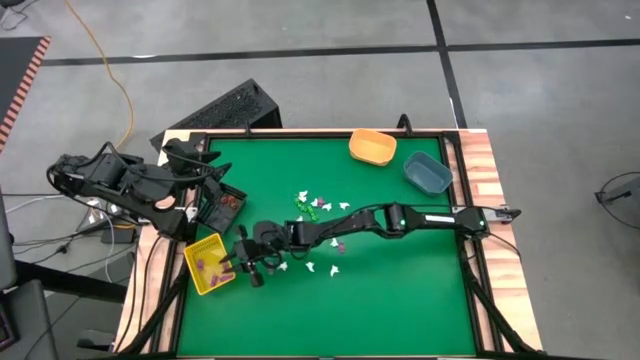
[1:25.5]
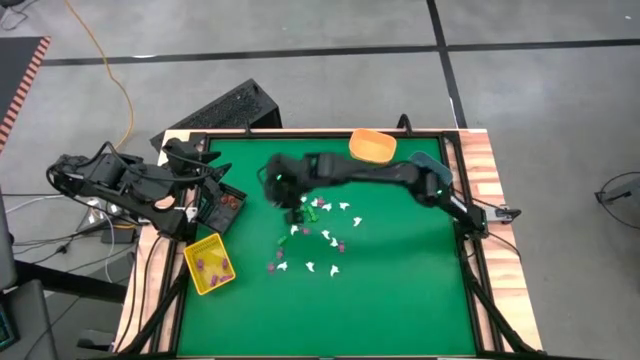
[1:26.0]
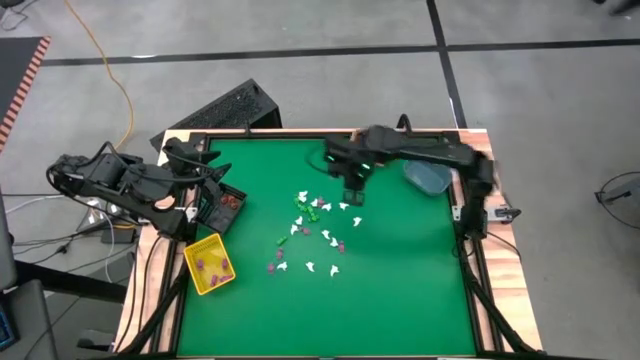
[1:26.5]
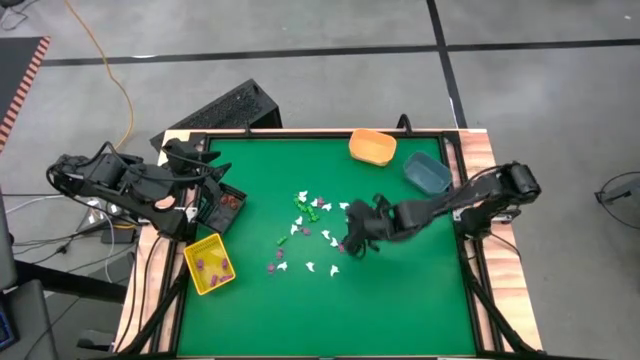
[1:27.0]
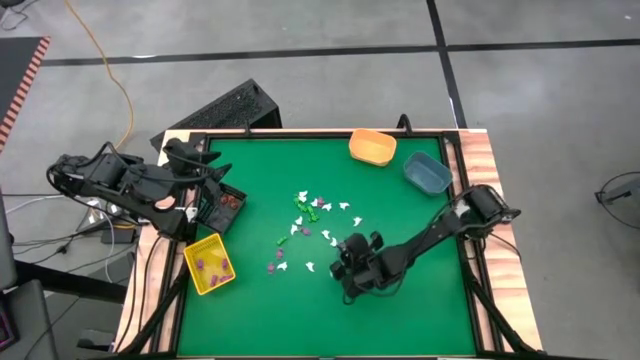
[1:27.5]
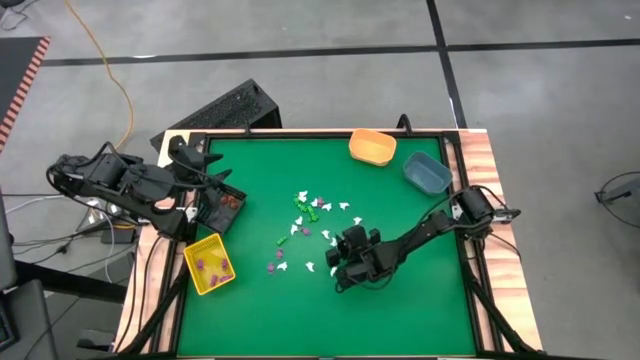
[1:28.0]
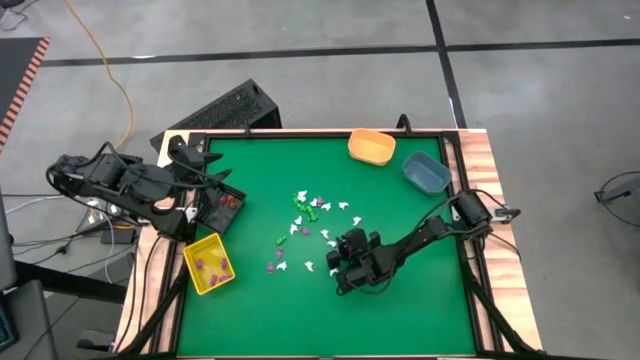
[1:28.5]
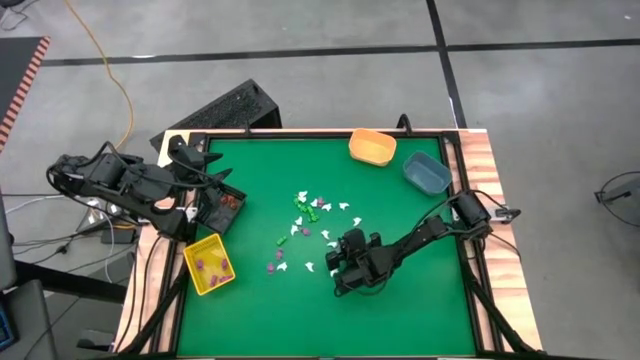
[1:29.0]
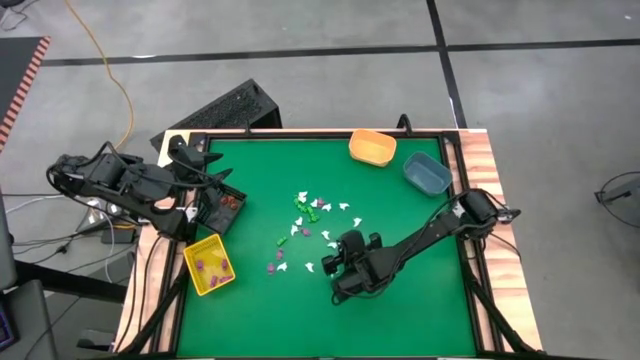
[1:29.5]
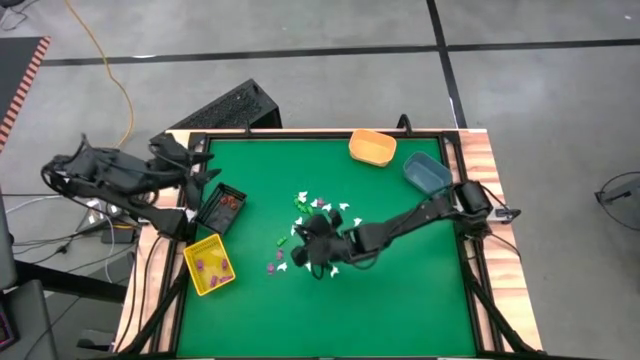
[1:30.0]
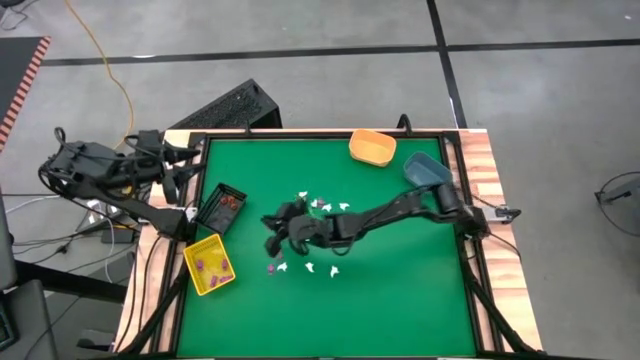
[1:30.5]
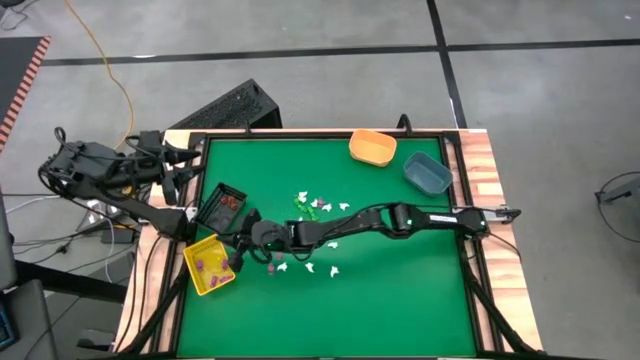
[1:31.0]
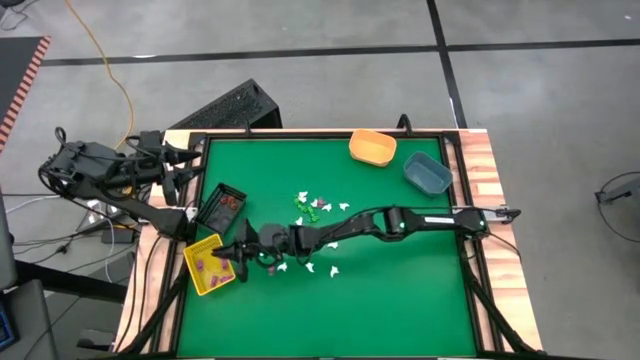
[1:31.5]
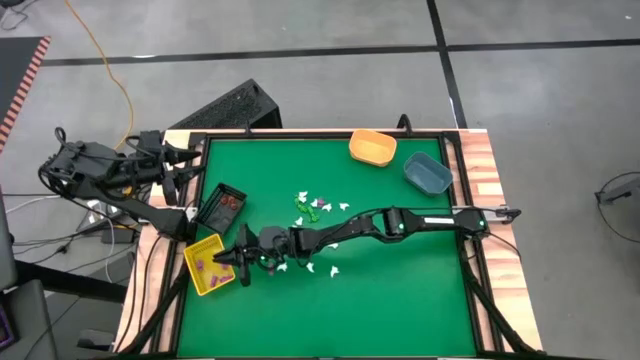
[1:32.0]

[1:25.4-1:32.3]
Task: Sort Halloween decoration
Put the pink skeleton toy into the yellow bin

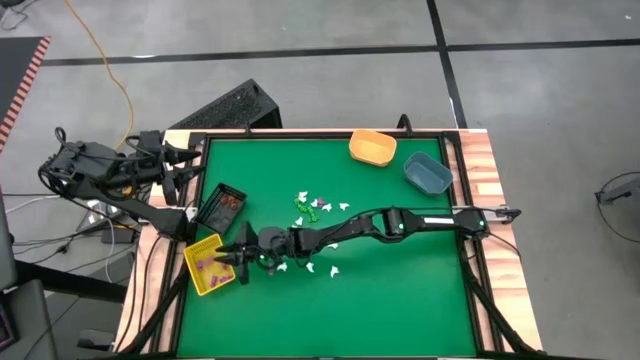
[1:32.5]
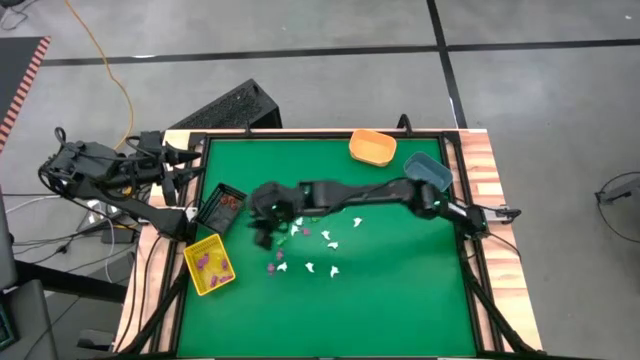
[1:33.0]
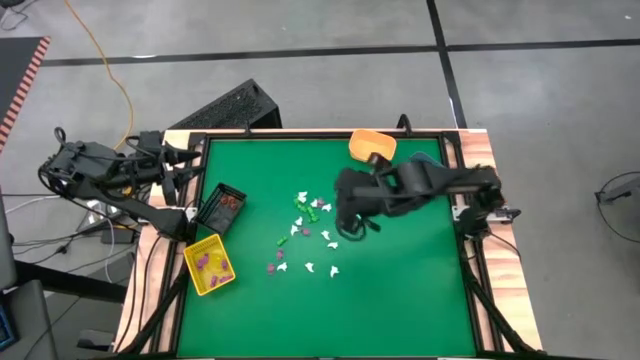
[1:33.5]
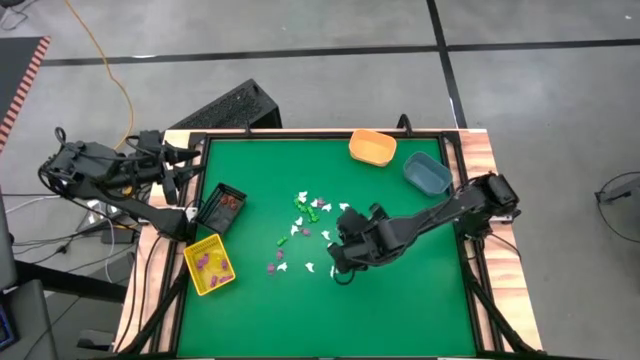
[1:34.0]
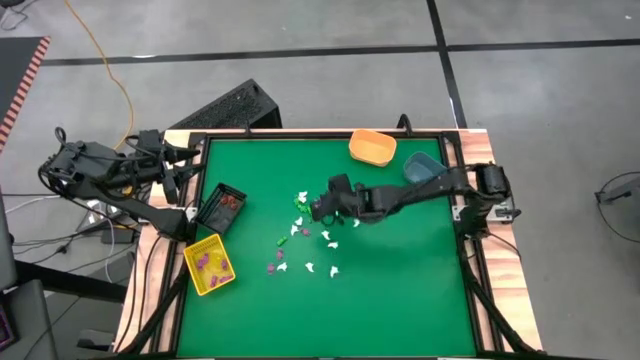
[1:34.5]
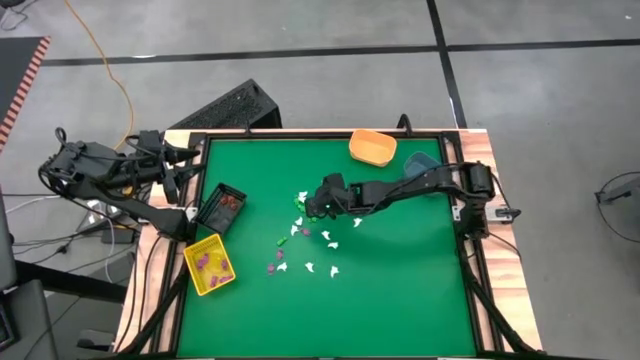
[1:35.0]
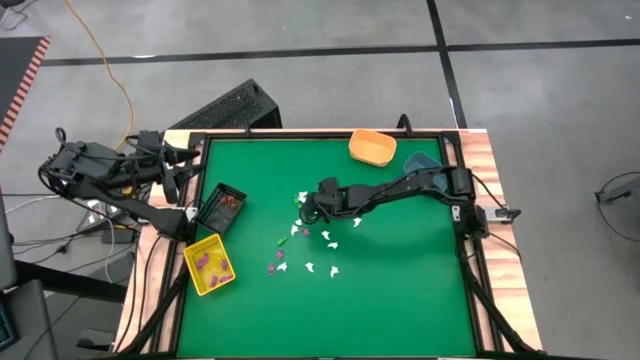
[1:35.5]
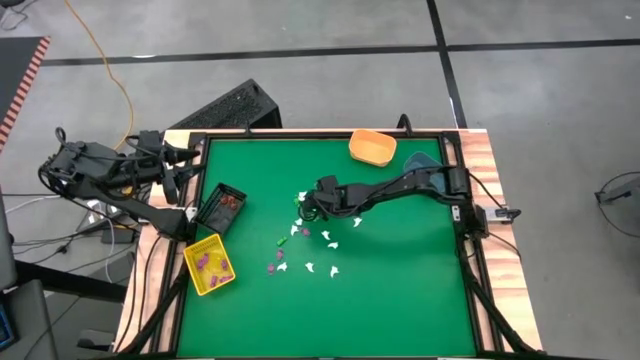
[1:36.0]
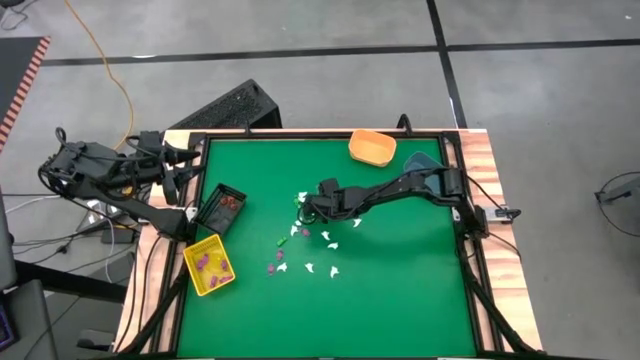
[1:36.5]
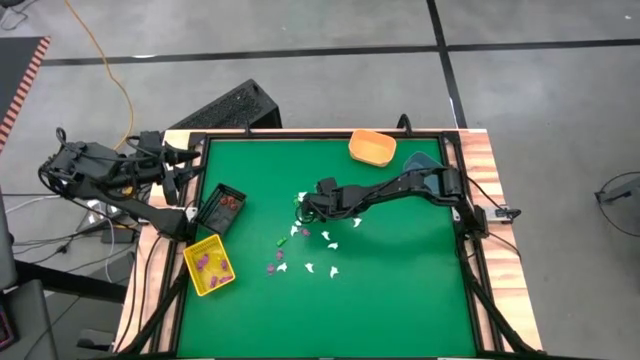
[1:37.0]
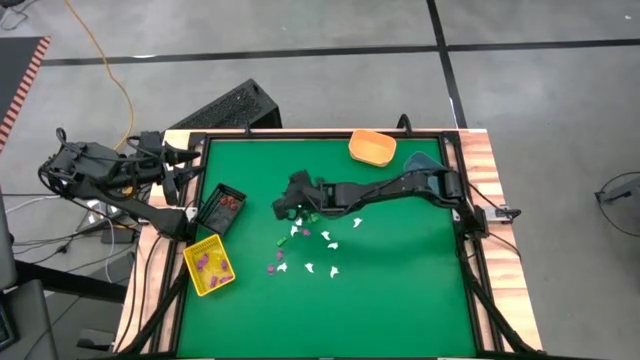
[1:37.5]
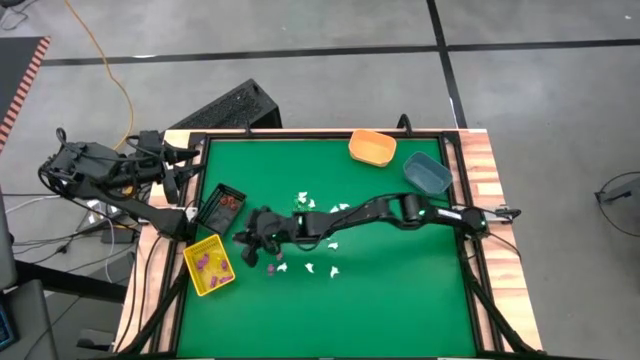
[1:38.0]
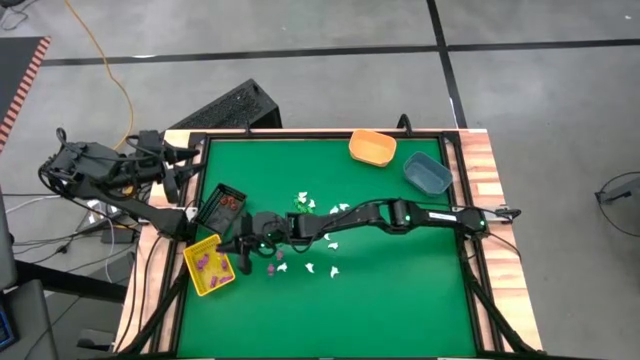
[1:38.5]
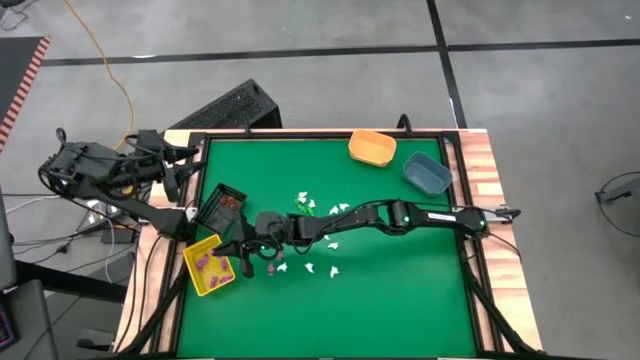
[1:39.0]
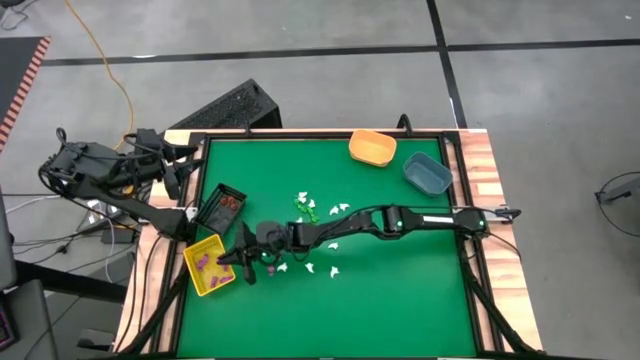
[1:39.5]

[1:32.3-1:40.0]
Put the pink skeleton toy into the yellow bin

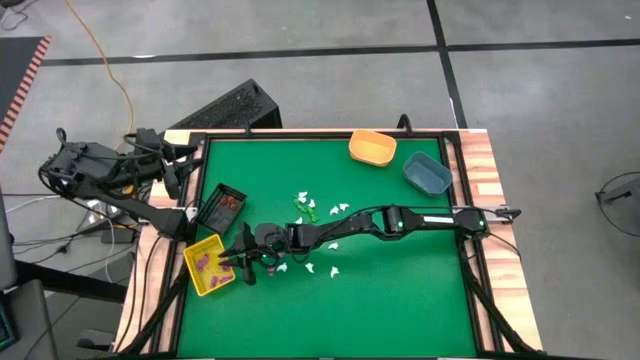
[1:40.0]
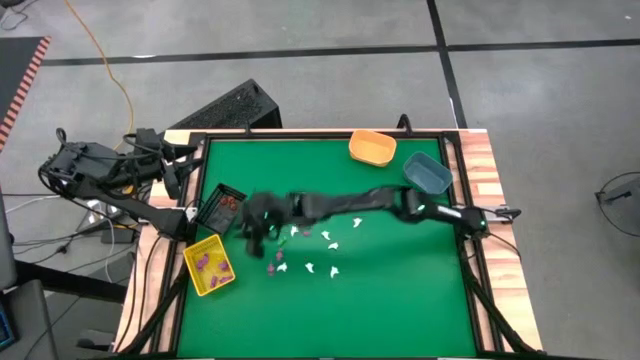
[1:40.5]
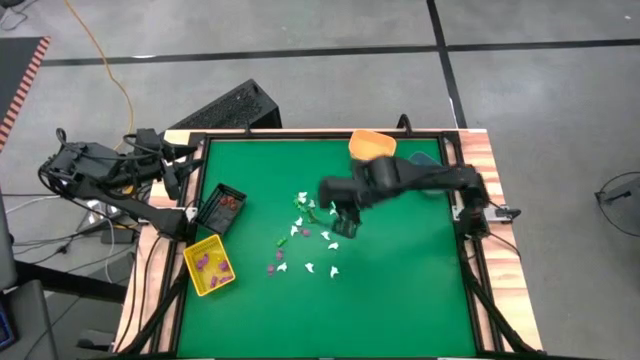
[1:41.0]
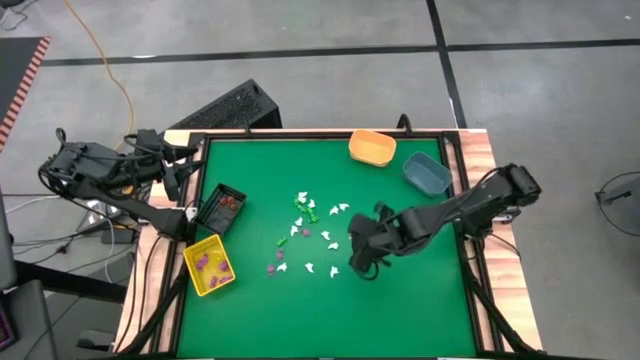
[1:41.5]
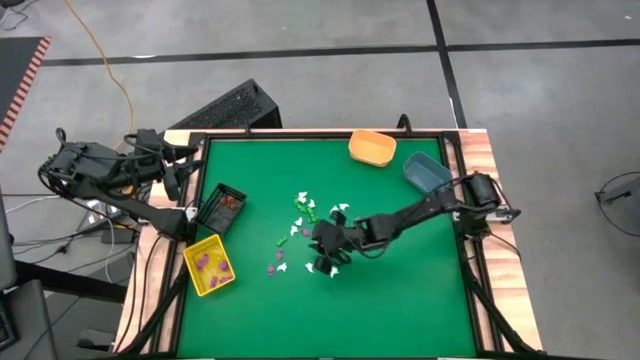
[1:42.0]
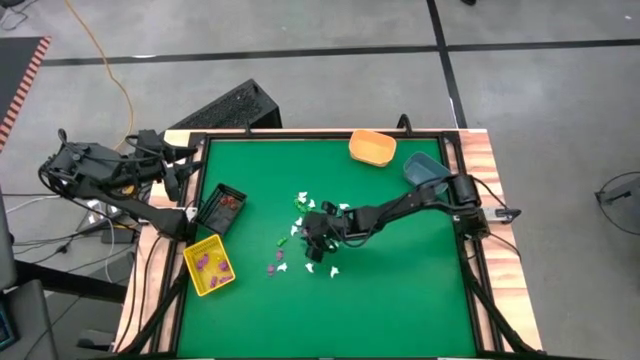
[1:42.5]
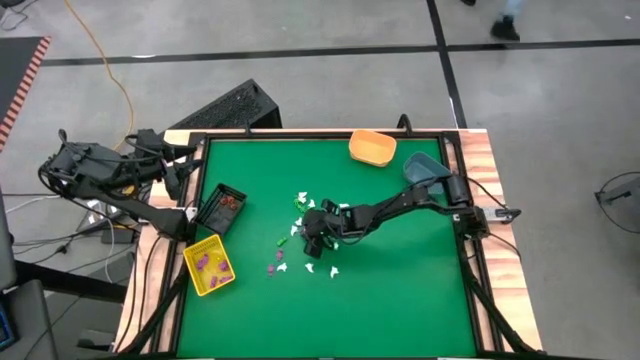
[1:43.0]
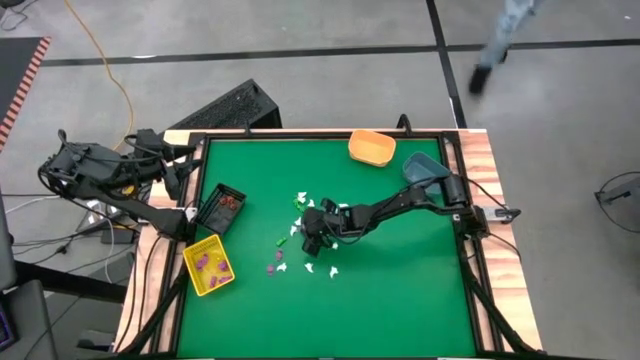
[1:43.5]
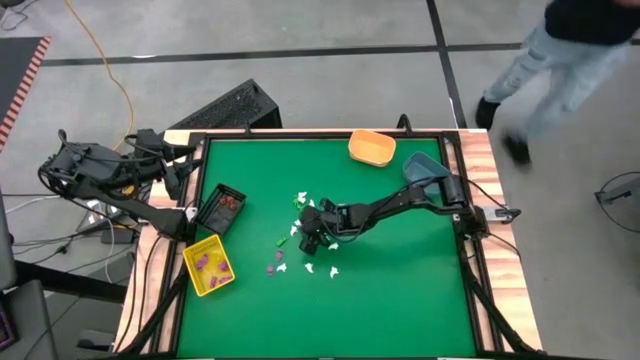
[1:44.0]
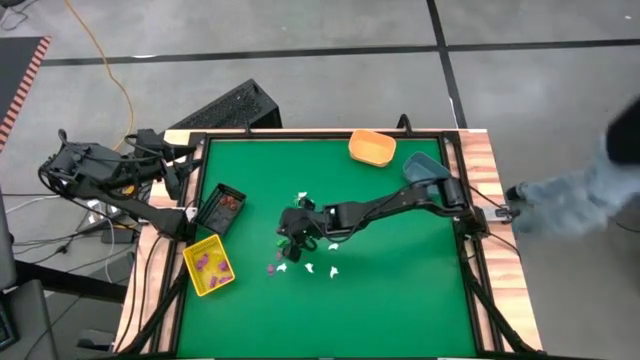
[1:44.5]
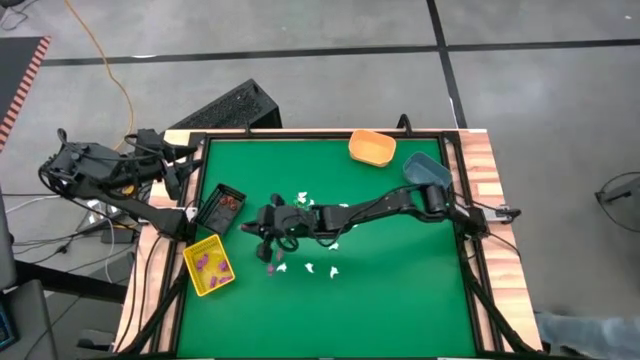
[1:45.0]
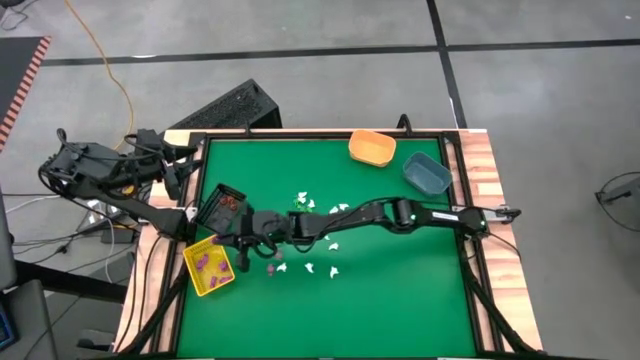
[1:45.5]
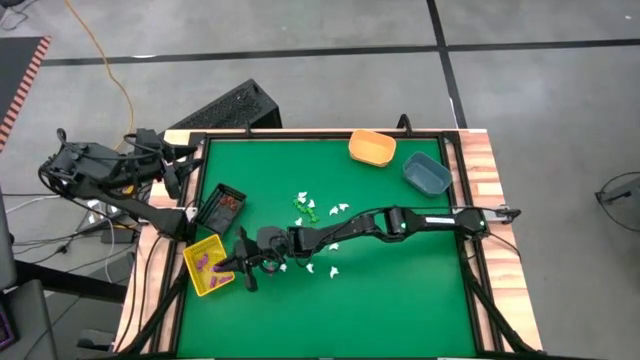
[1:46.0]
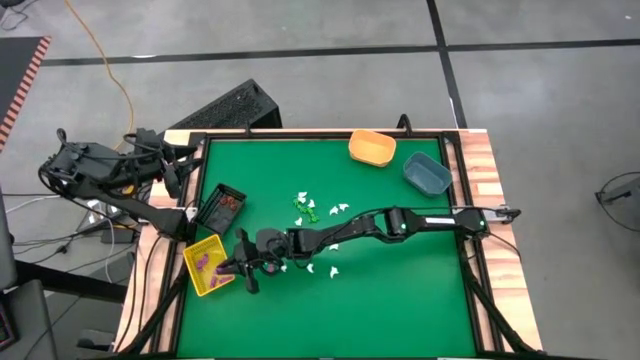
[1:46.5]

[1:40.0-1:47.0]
Put the pink skeleton toy into the yellow bin
